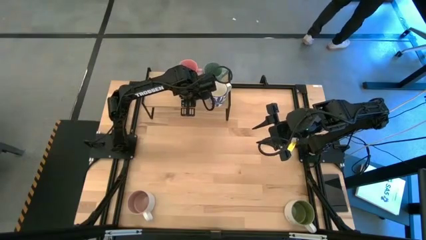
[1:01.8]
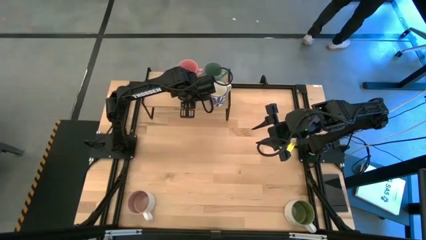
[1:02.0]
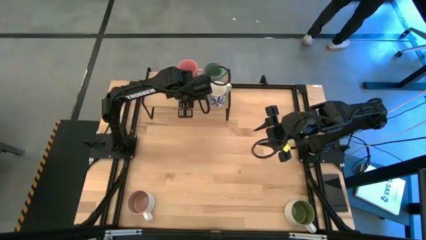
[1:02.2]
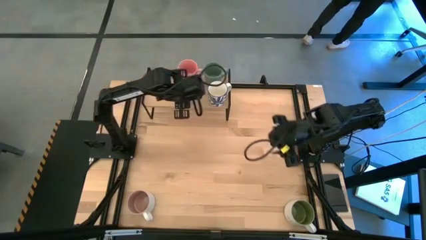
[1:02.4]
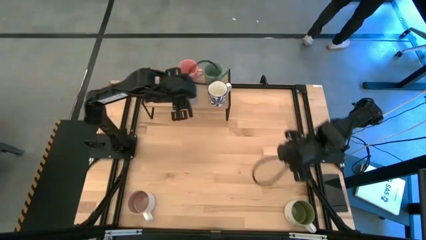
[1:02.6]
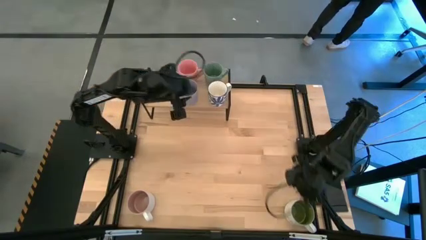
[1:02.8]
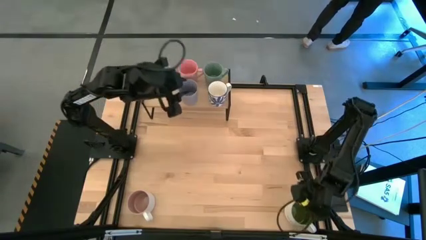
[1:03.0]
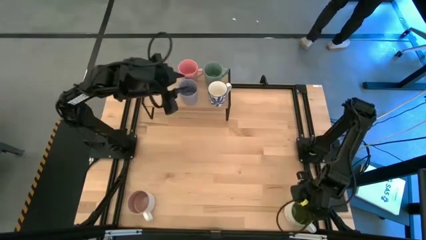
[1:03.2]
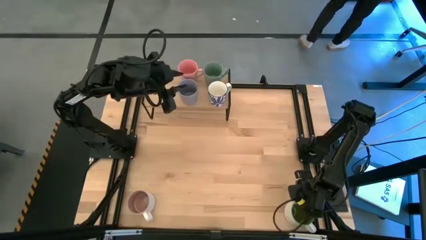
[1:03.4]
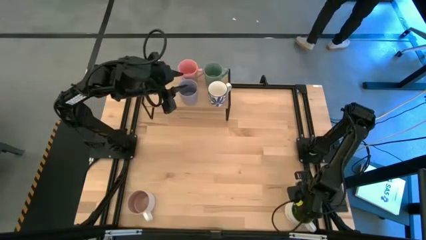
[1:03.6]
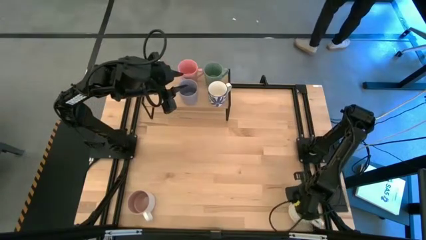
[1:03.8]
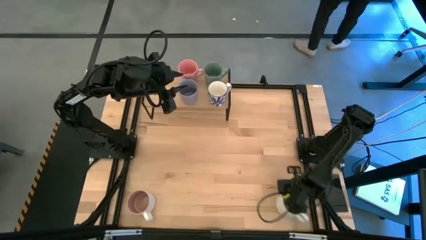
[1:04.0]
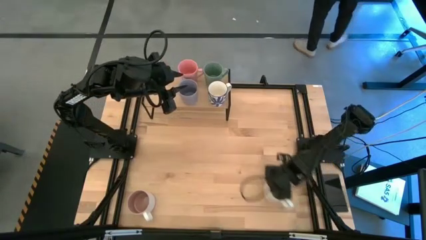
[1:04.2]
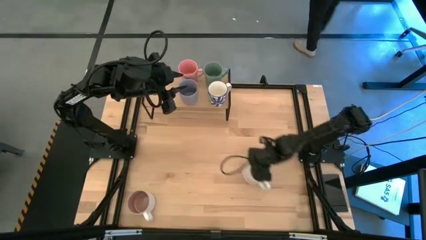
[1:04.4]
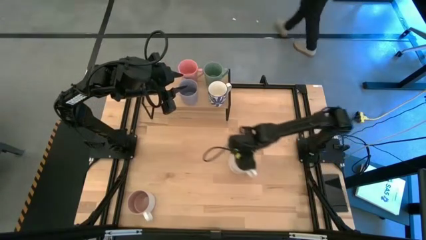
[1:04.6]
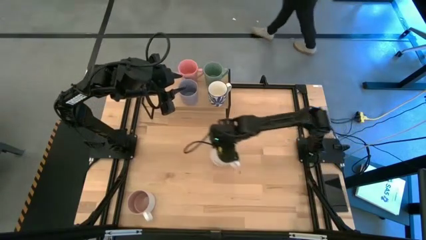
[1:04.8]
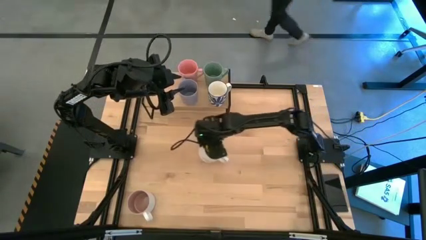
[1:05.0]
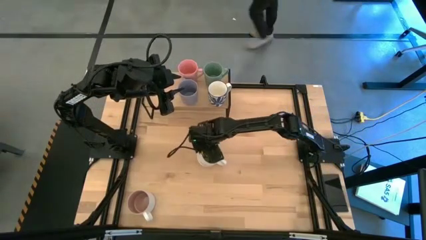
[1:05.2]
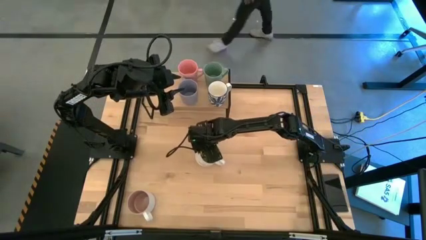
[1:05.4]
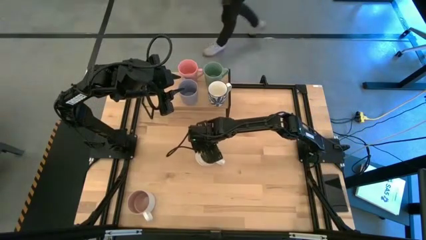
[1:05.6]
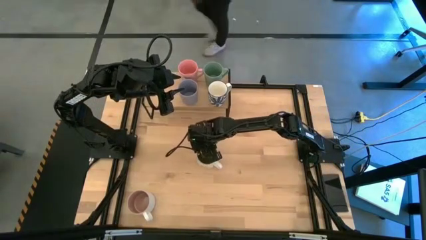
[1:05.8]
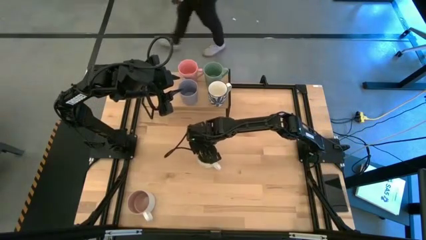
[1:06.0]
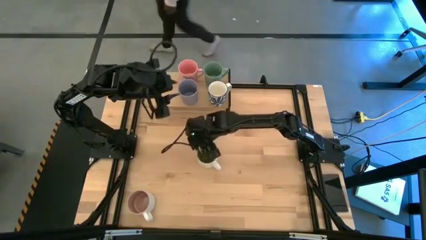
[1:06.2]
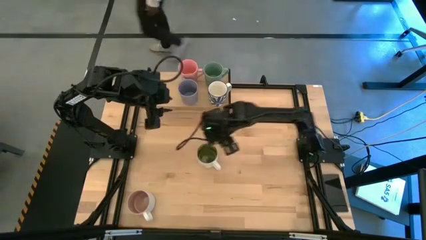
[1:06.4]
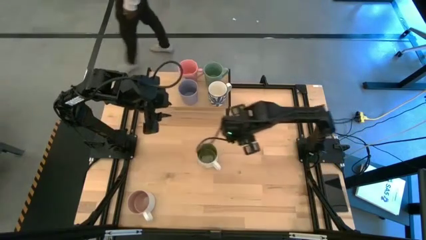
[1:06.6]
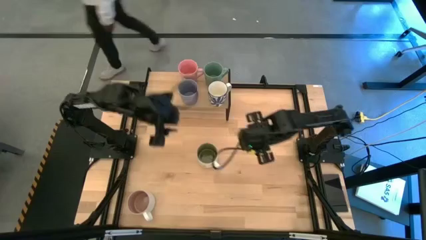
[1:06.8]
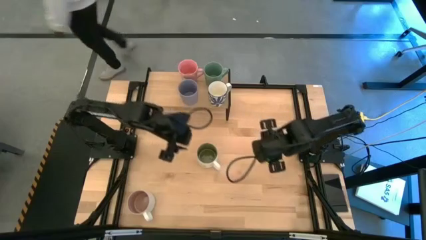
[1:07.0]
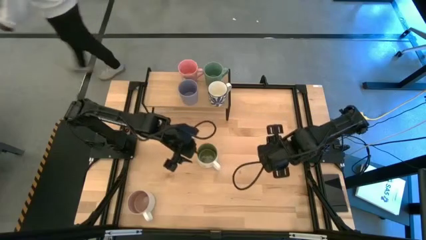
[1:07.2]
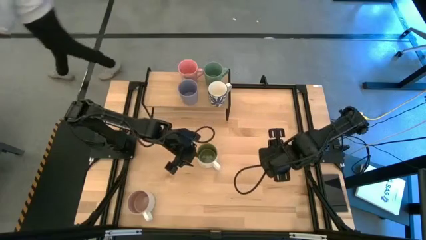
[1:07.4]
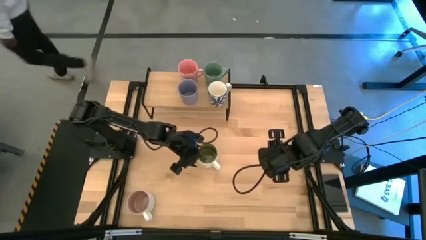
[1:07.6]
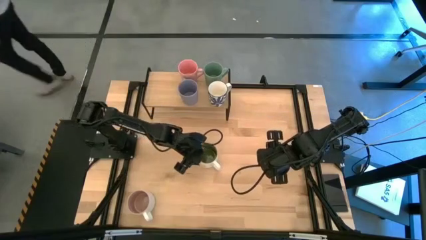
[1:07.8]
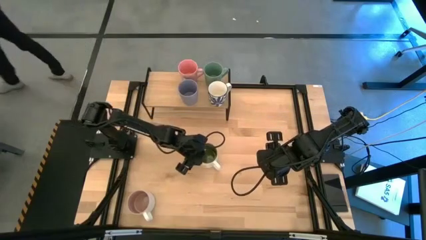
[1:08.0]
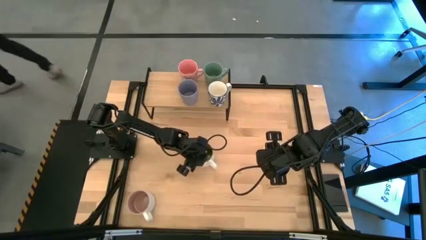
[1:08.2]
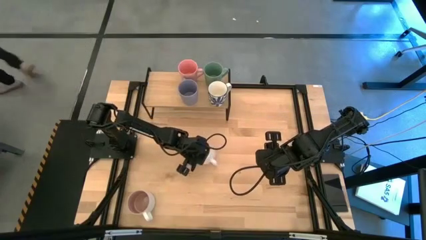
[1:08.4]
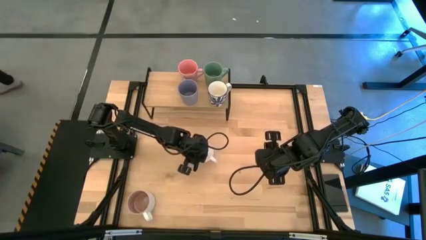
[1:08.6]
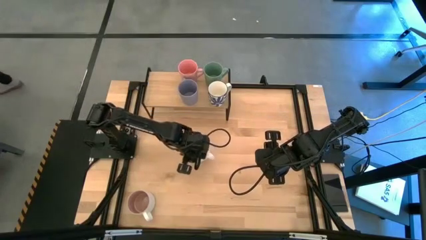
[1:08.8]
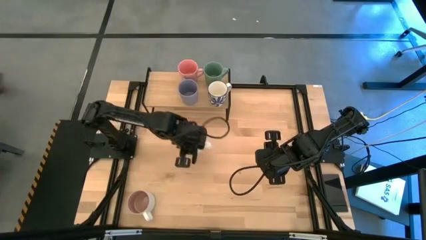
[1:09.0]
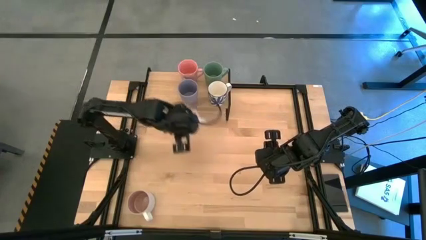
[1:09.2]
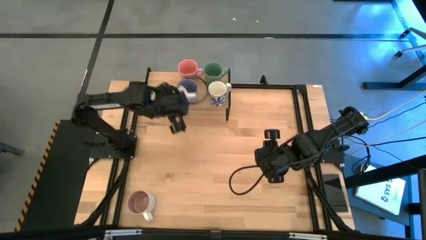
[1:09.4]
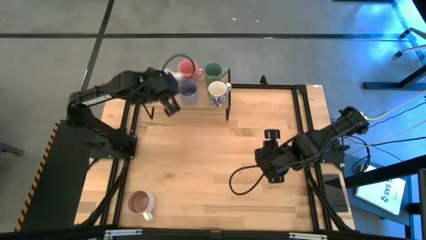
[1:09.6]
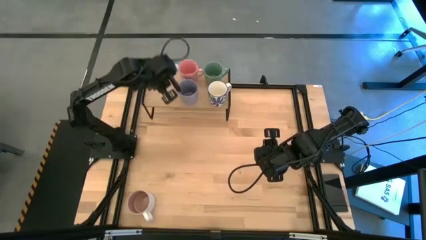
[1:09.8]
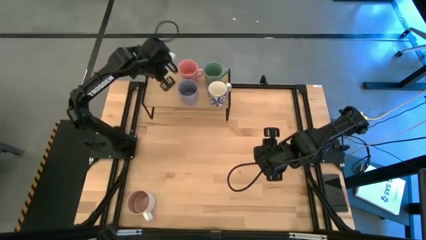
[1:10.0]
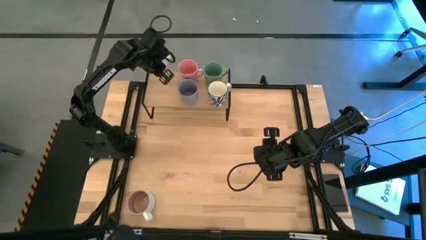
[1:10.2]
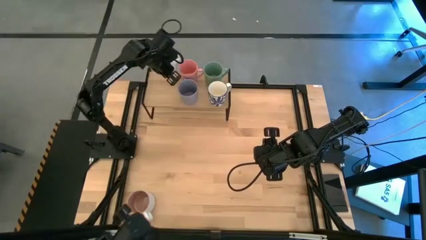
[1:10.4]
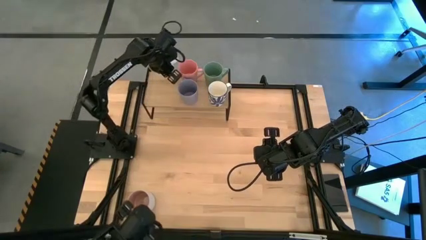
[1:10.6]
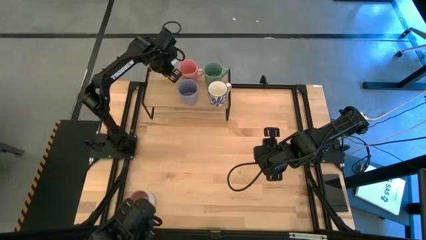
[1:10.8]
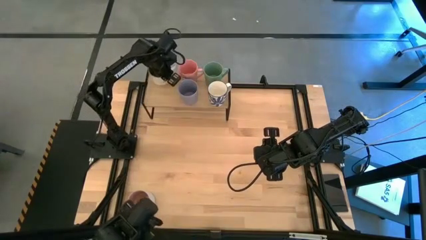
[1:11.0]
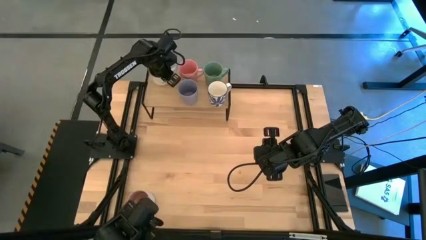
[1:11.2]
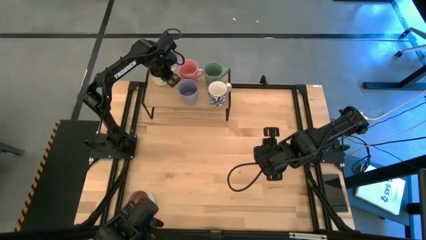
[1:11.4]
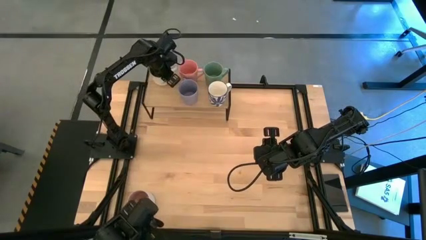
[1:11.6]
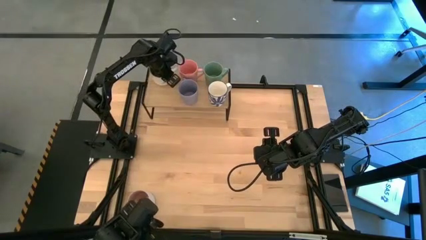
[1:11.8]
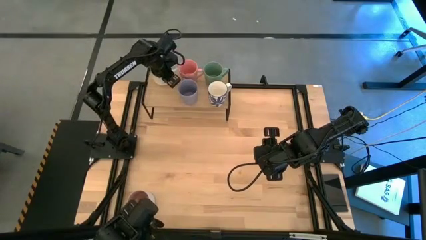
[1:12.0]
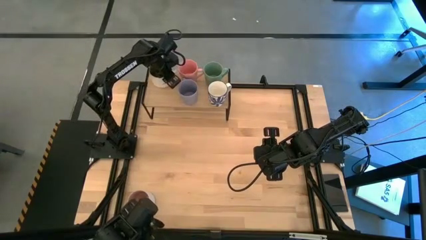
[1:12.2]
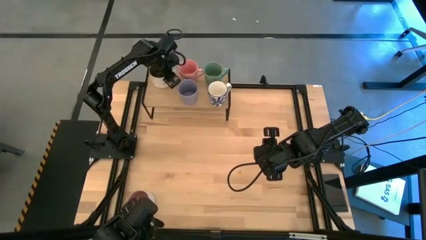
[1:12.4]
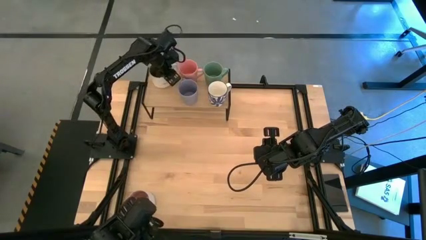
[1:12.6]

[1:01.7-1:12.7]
Task: Place coffee mugs
Put the white green mug on the shelf

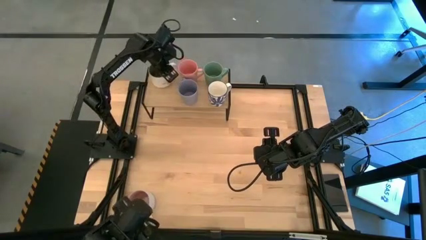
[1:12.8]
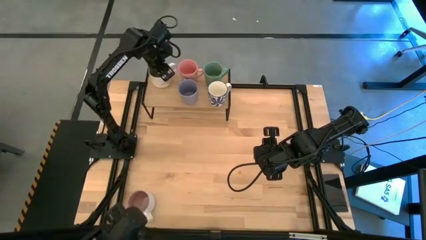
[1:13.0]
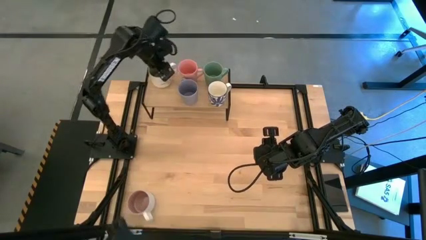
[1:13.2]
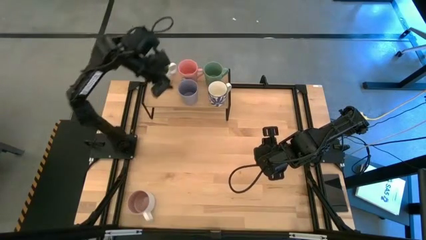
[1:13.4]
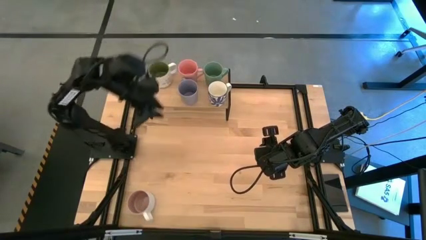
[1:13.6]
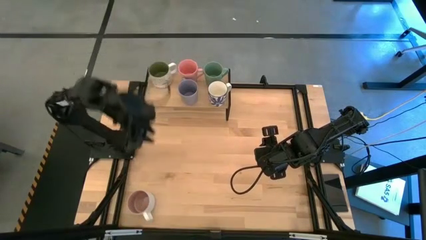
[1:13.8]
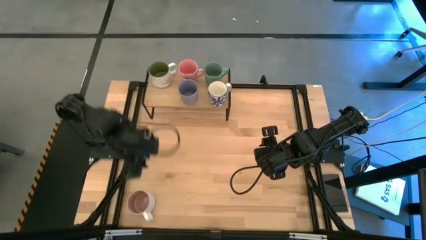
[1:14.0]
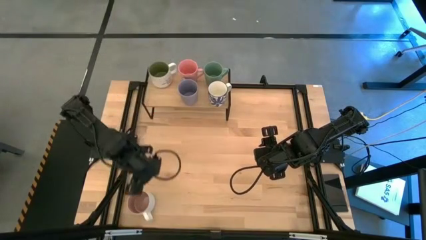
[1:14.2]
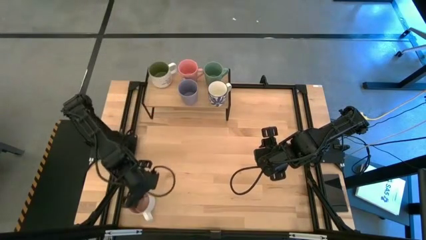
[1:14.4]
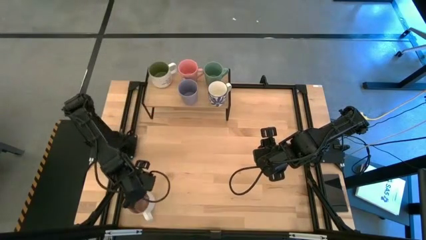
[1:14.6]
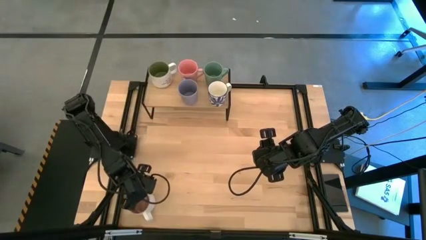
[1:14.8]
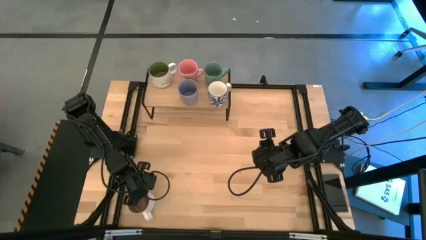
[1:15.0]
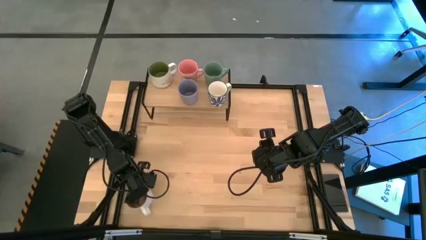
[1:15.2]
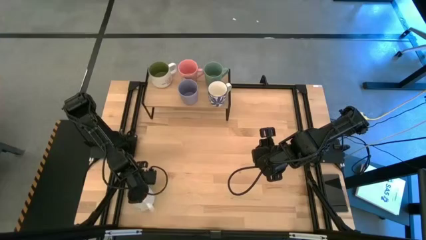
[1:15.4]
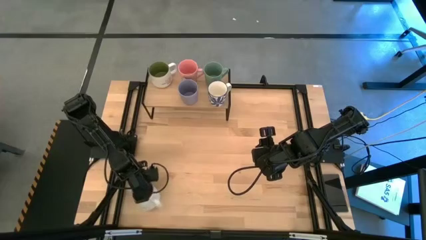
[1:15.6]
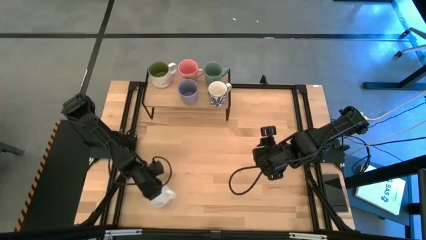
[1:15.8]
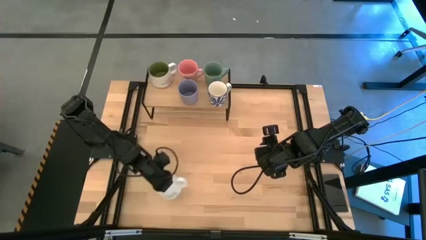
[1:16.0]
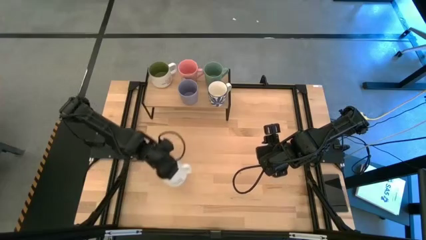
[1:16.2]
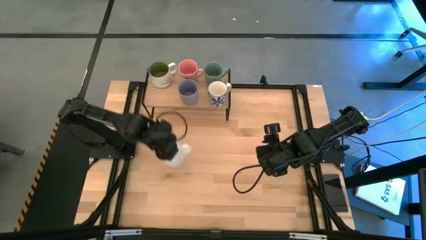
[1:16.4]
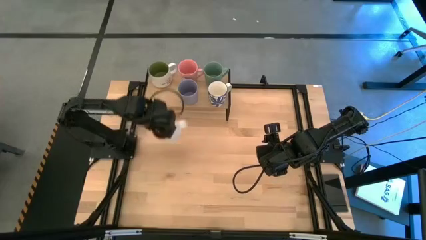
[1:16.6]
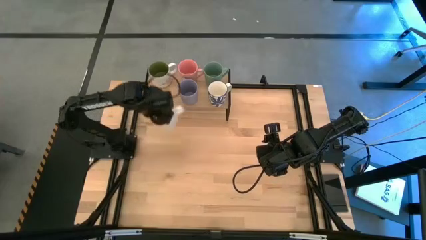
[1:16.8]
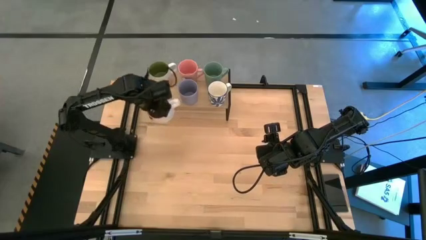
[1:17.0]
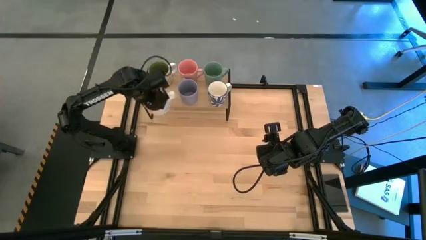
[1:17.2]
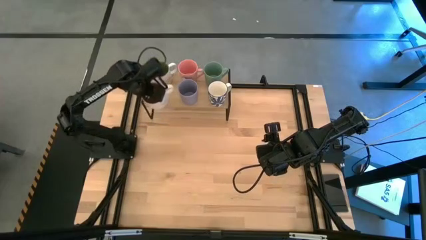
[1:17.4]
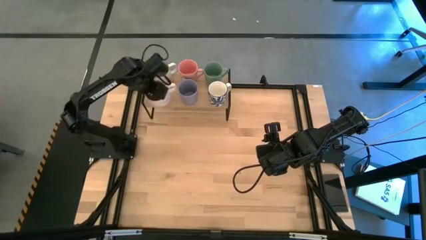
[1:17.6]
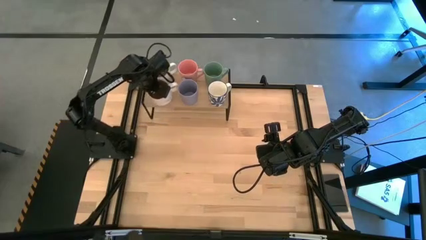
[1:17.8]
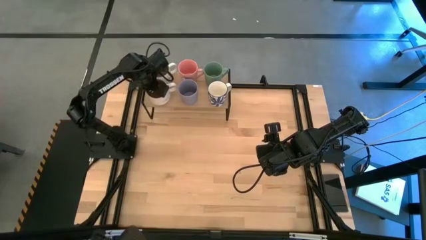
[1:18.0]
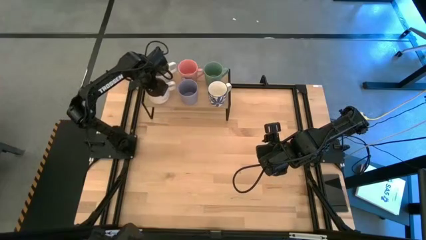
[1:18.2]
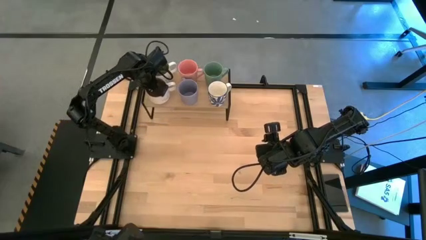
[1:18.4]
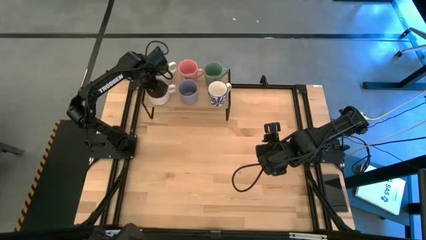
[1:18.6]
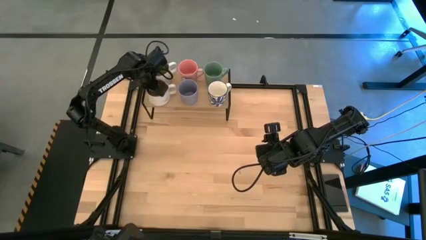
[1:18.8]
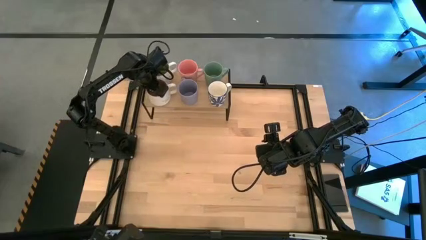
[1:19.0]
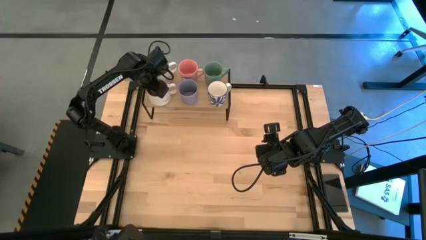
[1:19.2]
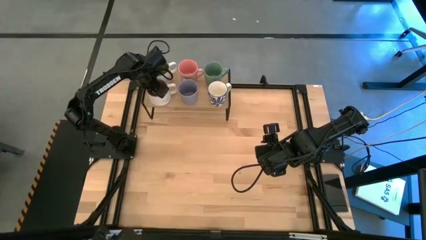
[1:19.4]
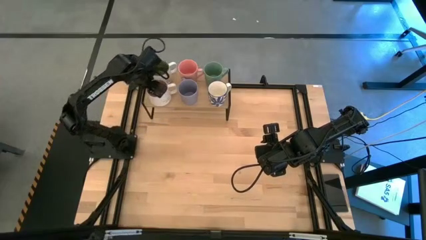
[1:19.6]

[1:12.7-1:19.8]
Put the white pink mug on the shelf
